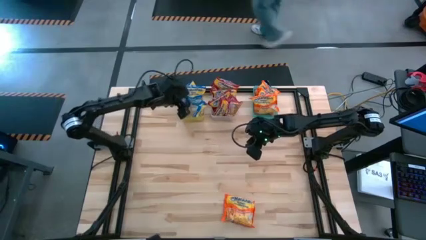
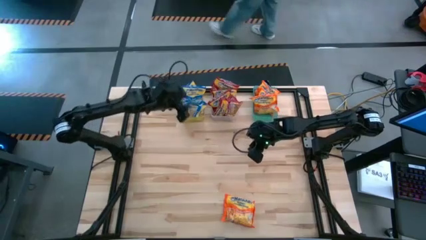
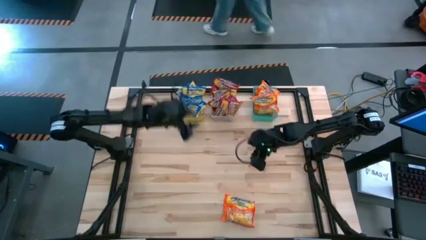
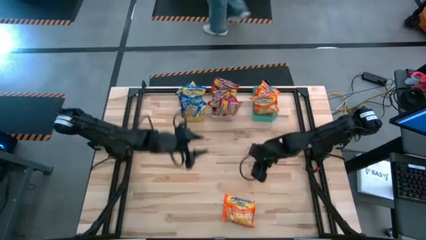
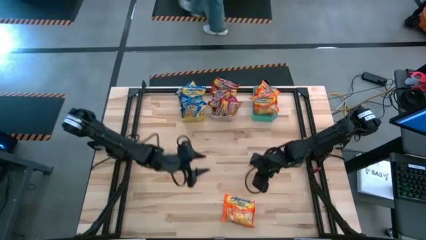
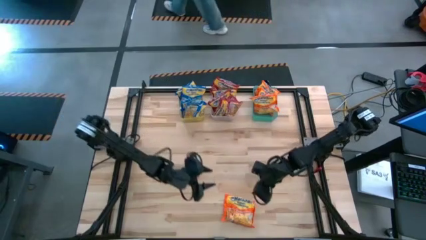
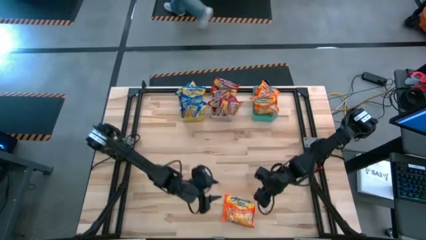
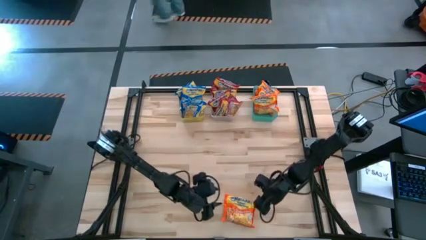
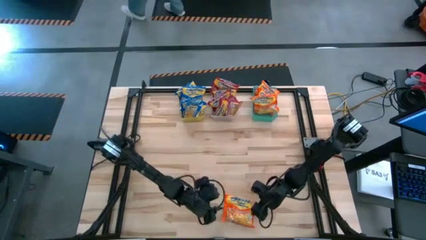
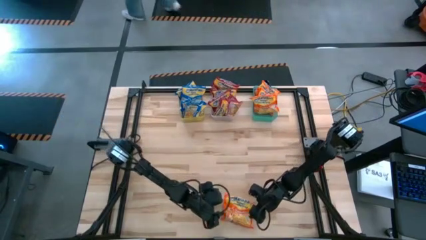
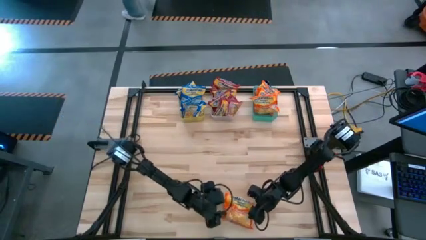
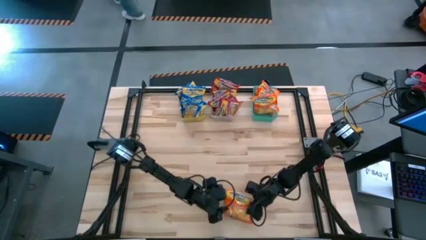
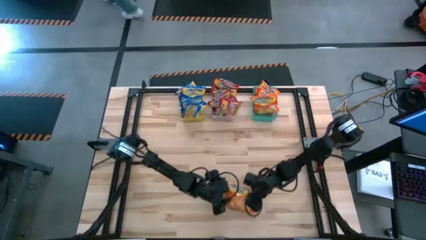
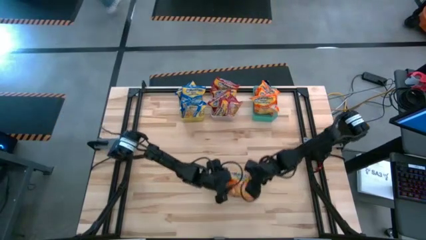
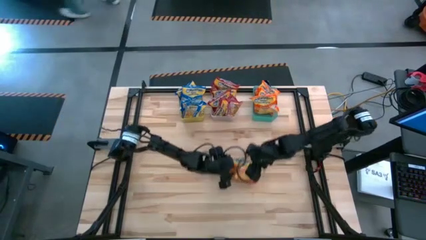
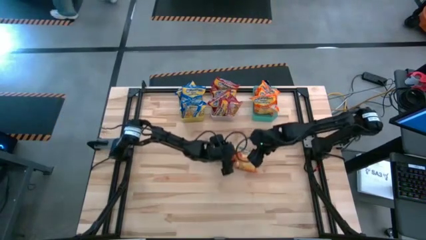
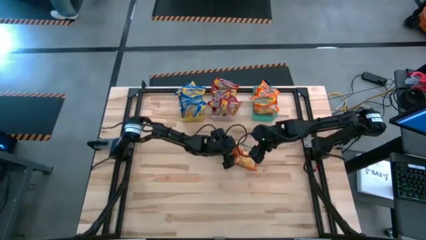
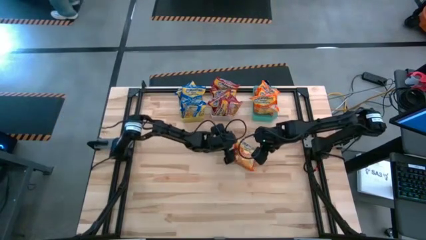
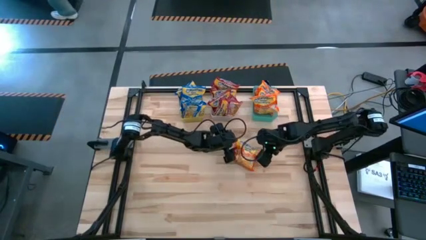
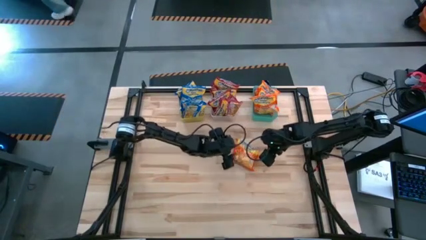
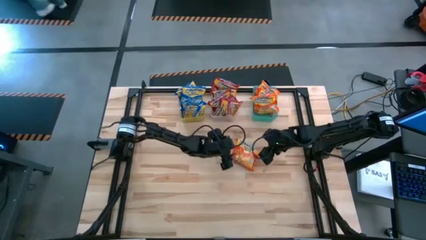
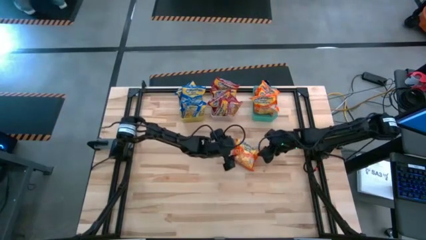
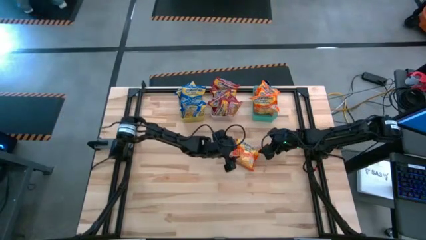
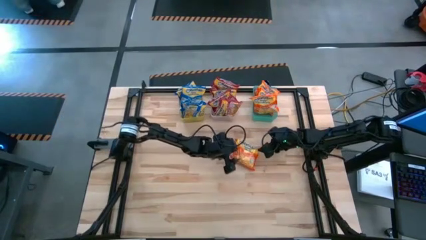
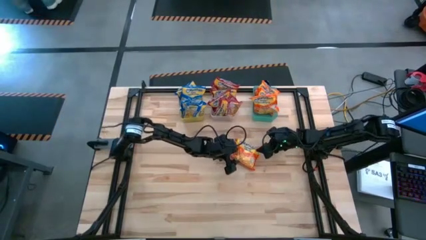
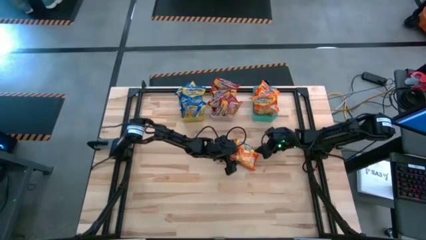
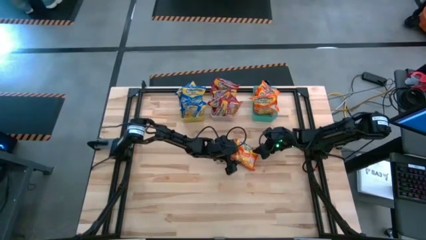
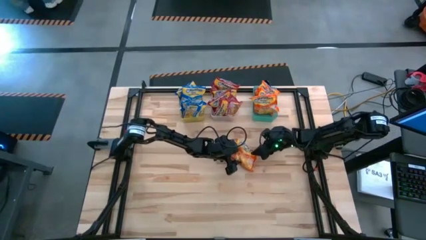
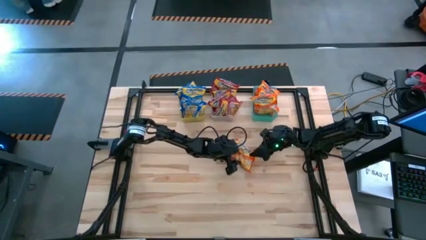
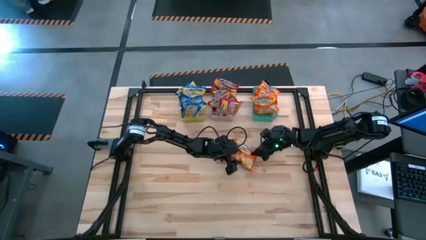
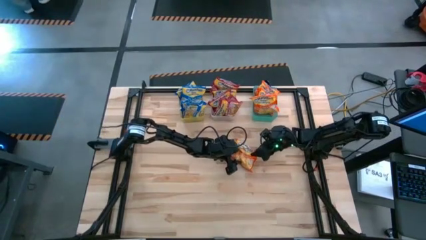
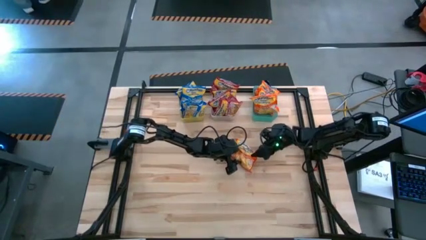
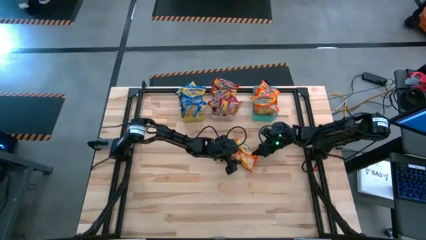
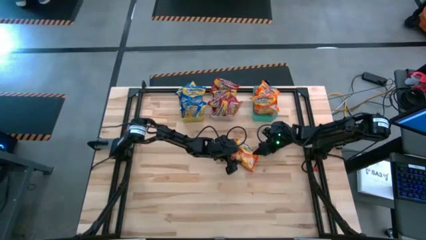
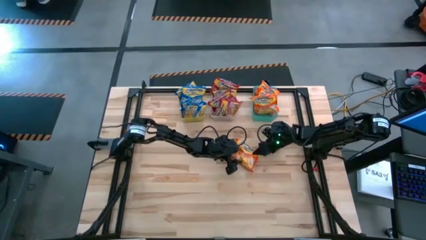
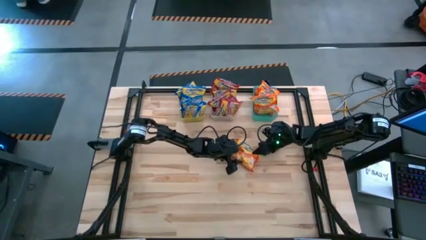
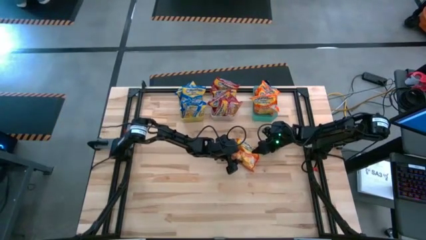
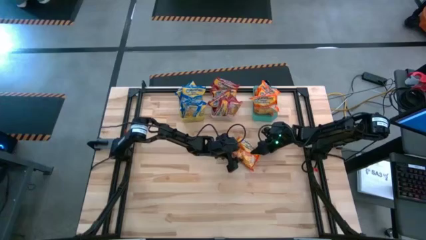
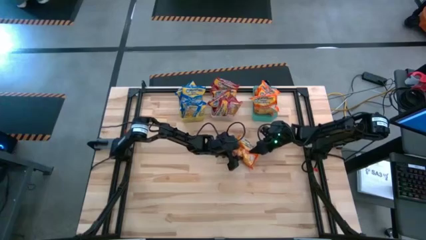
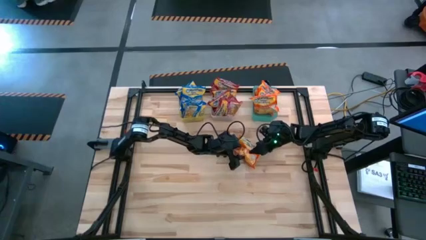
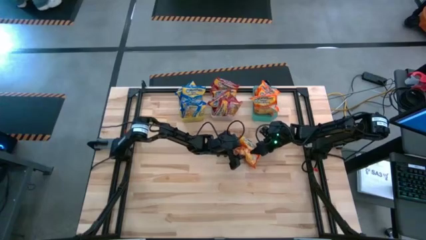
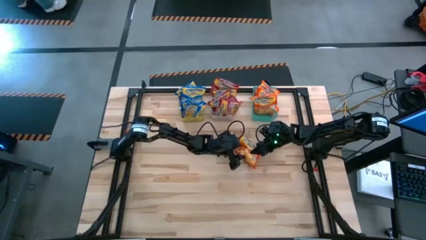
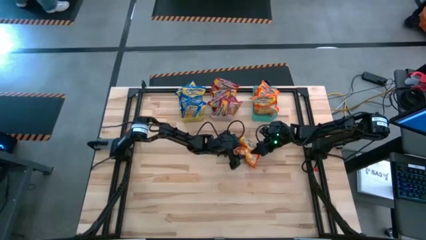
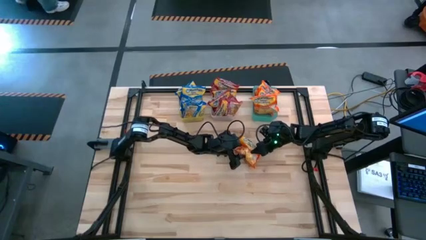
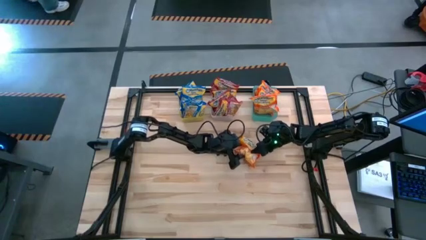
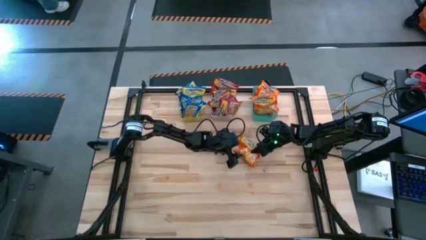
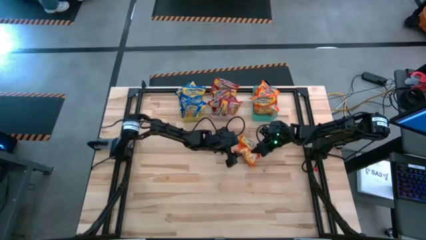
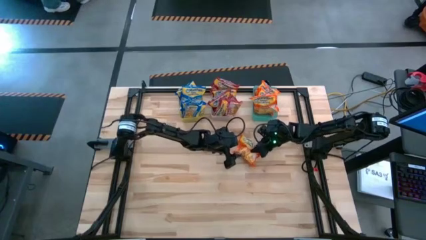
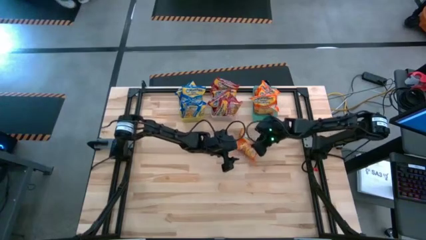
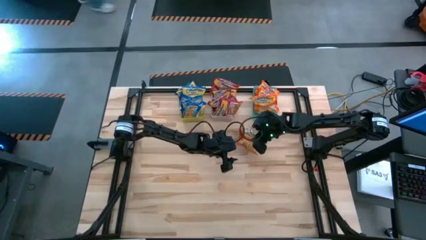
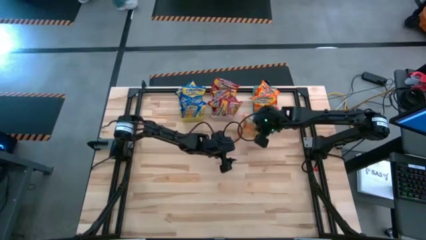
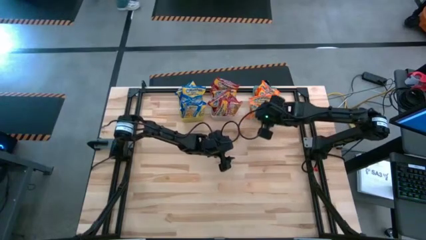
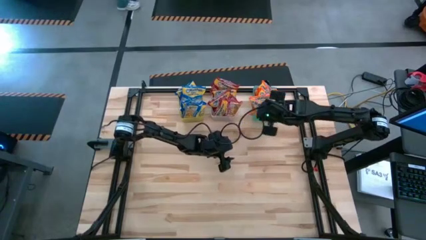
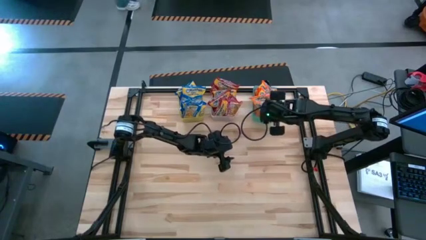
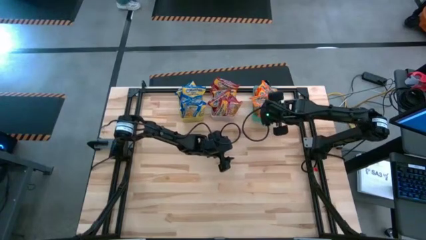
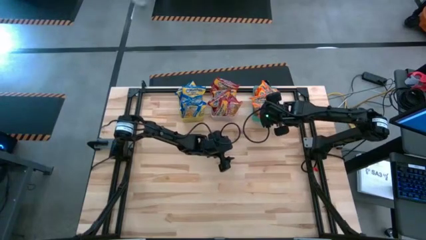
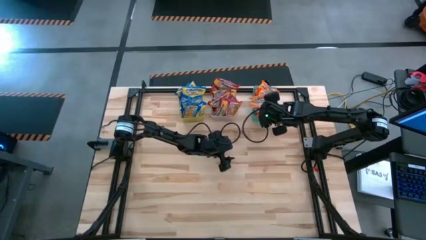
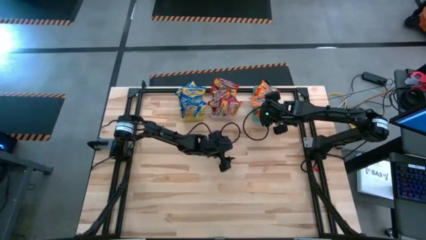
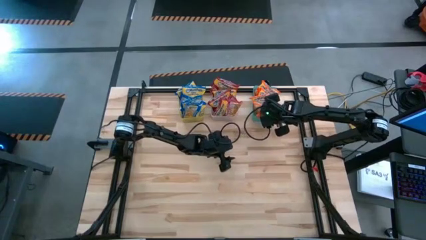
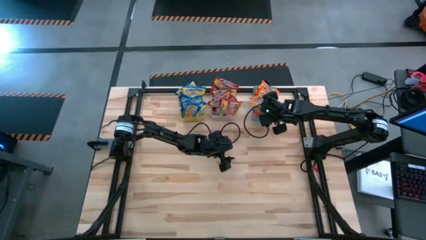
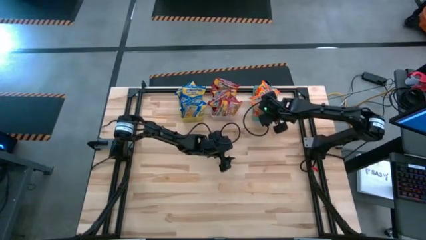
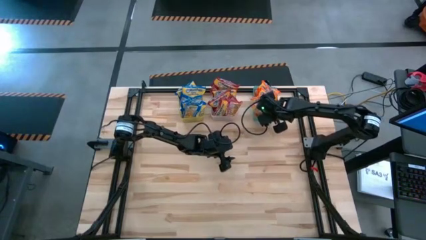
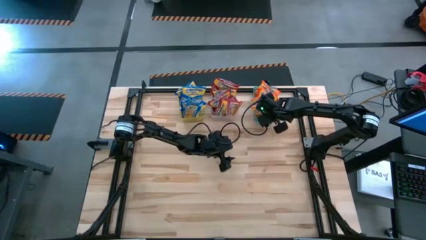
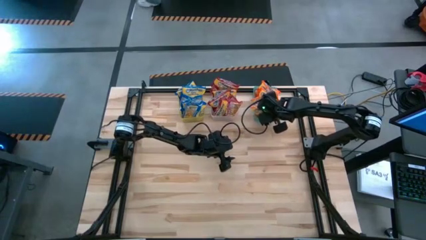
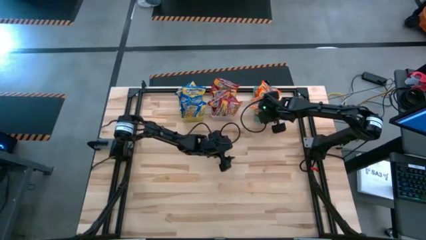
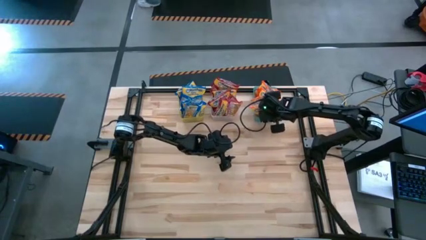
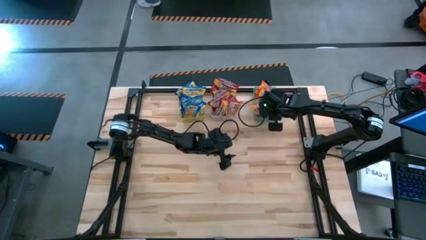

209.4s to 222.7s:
Task: Sort Maruchan noodles
Put the orange noodle into the green bin

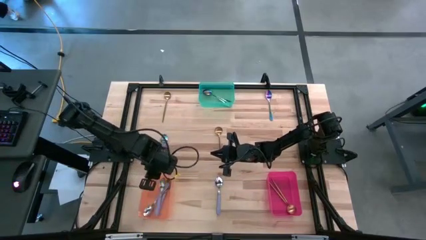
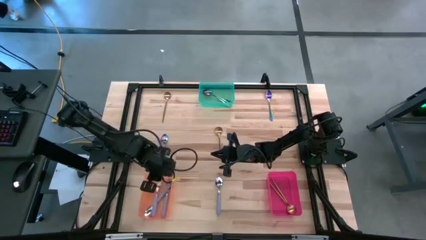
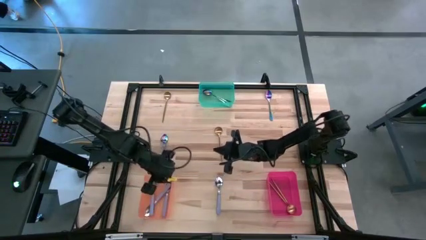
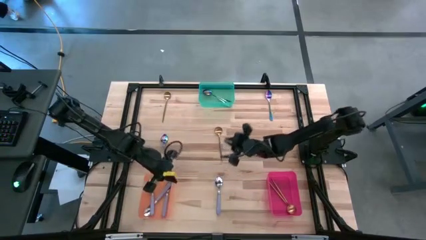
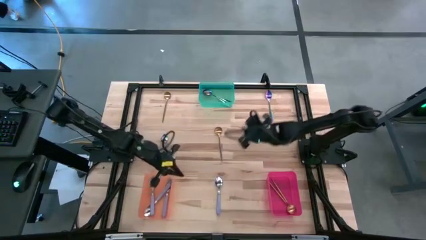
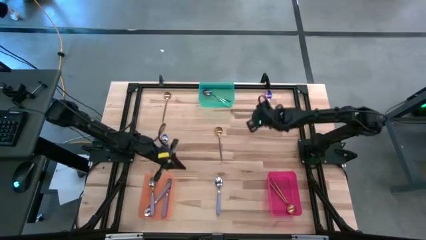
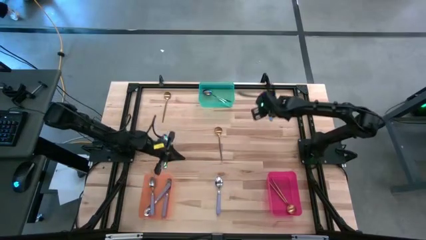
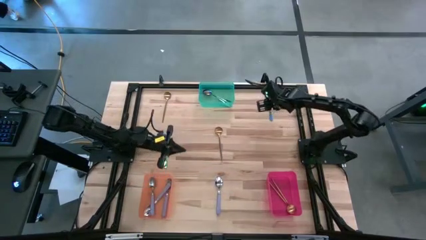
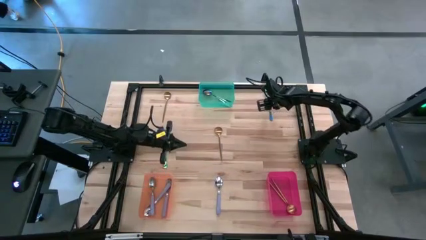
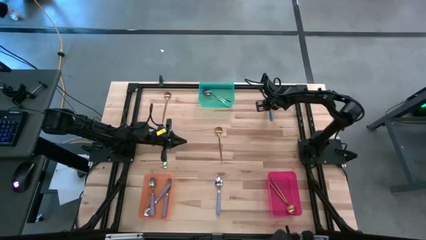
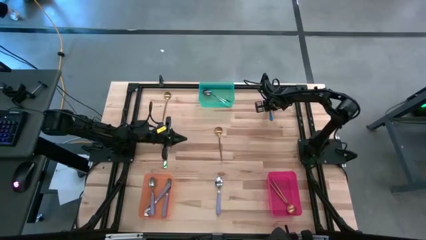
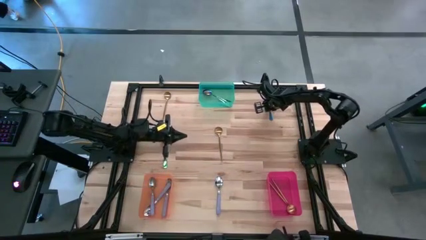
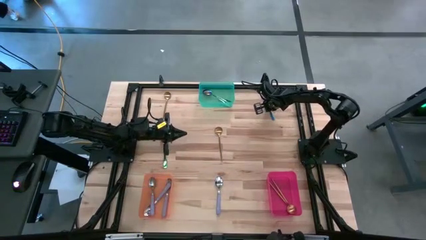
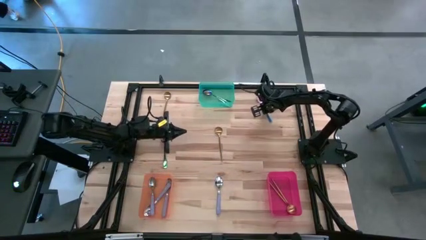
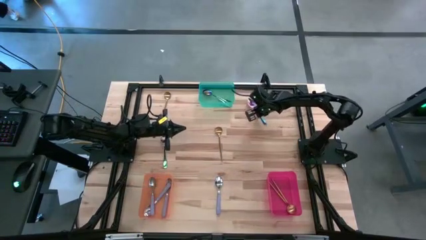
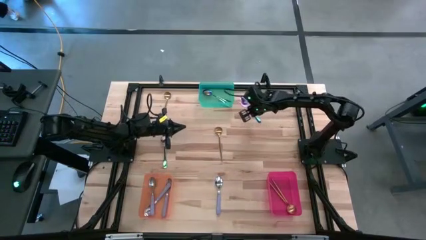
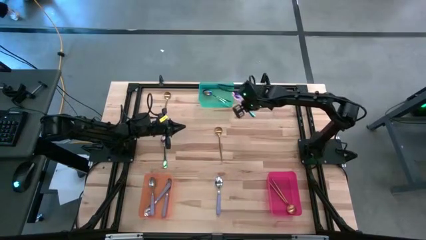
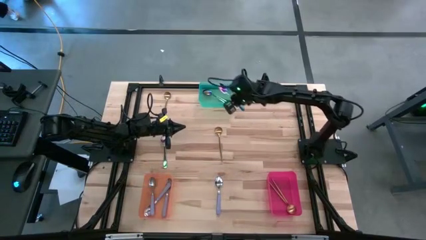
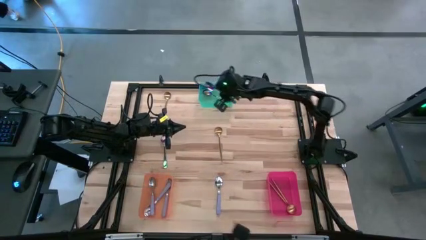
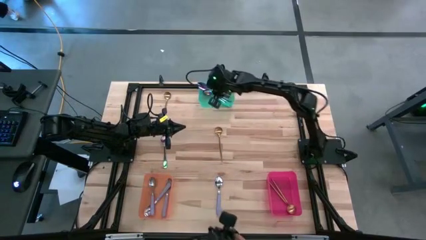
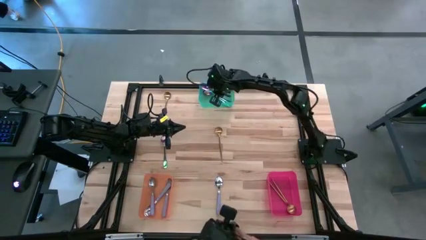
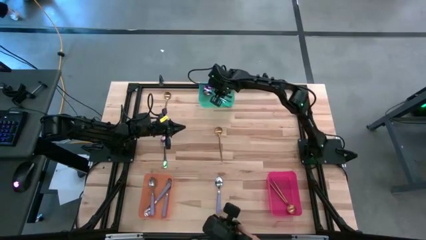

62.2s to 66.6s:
Task: Sort silverware by color (type)
Put the violet spoon into the blue bin
